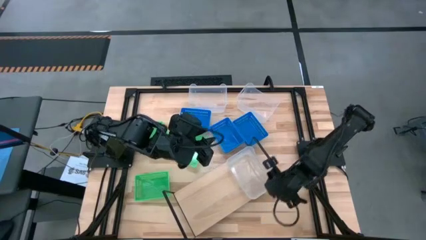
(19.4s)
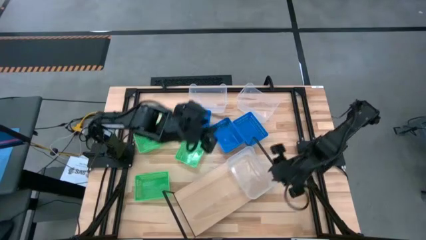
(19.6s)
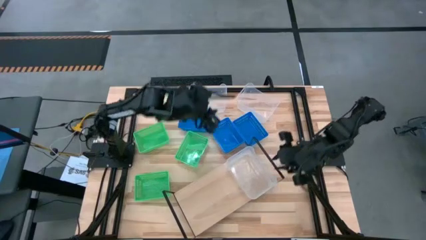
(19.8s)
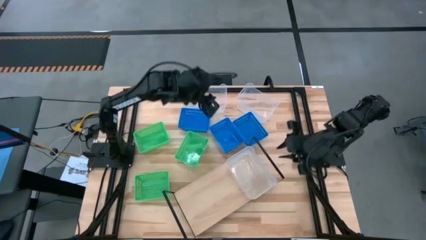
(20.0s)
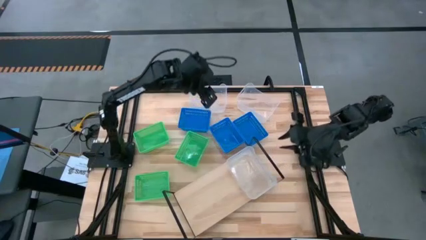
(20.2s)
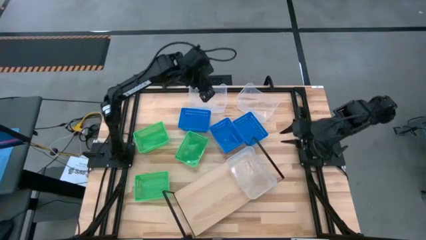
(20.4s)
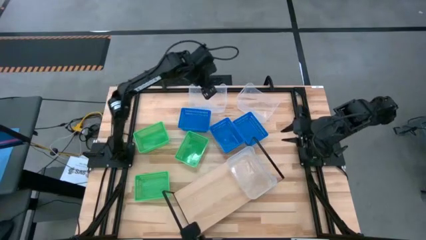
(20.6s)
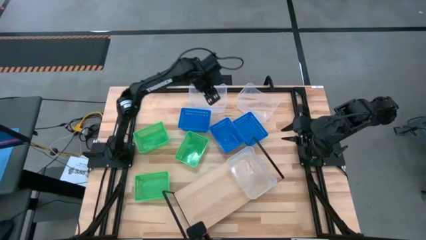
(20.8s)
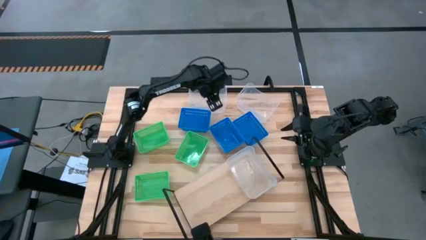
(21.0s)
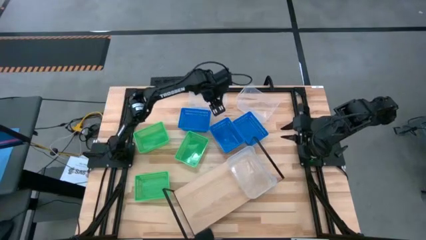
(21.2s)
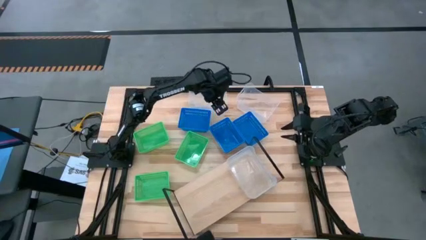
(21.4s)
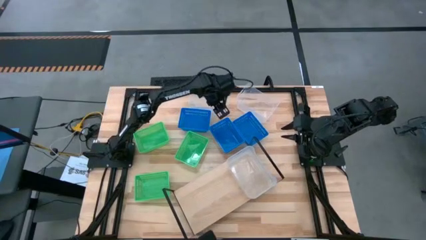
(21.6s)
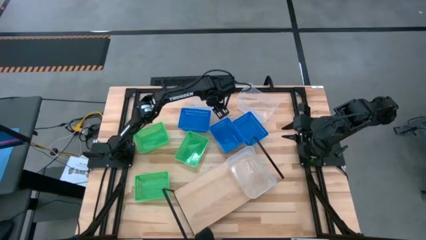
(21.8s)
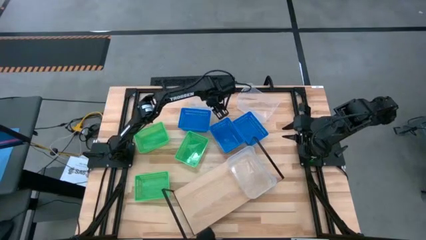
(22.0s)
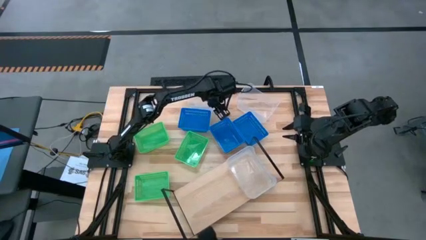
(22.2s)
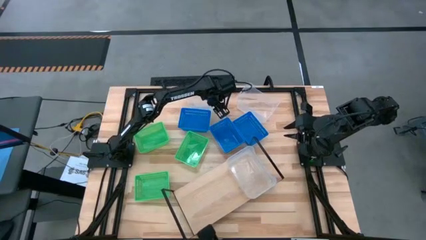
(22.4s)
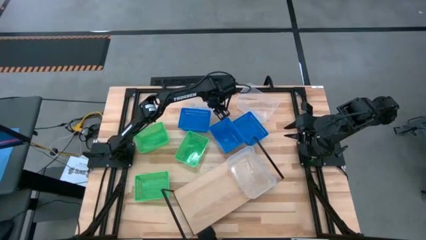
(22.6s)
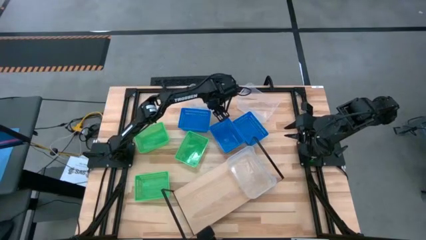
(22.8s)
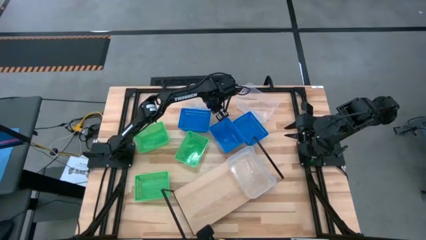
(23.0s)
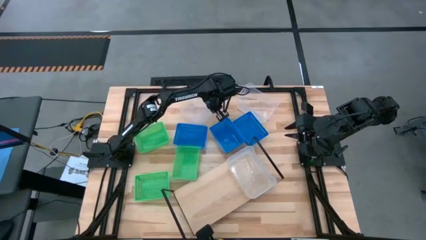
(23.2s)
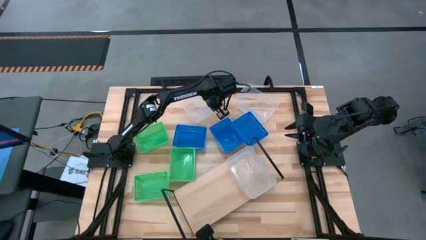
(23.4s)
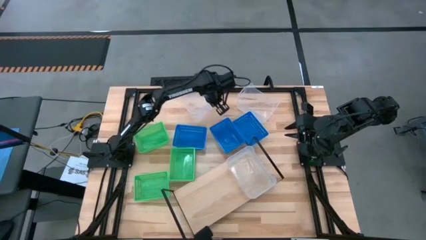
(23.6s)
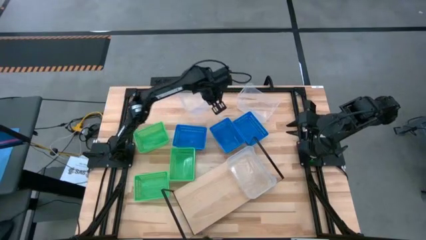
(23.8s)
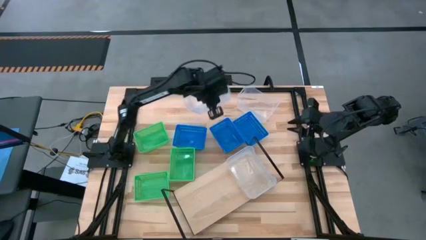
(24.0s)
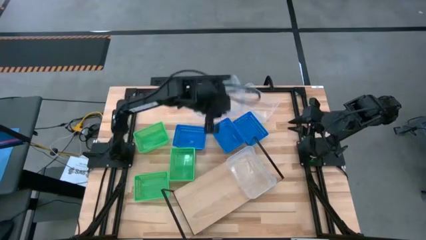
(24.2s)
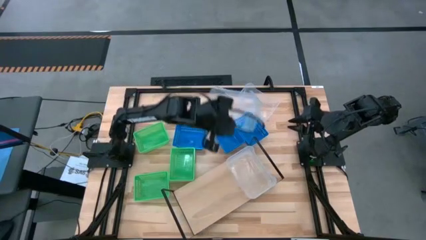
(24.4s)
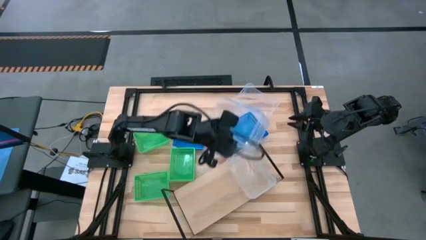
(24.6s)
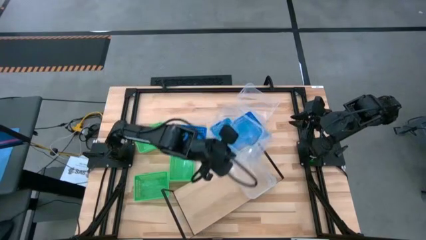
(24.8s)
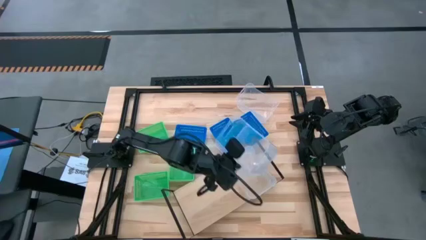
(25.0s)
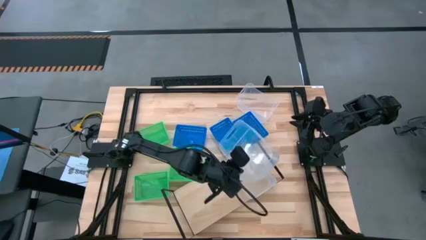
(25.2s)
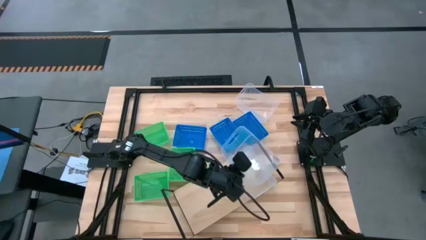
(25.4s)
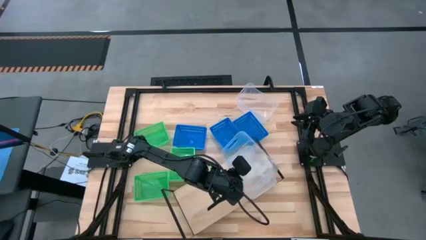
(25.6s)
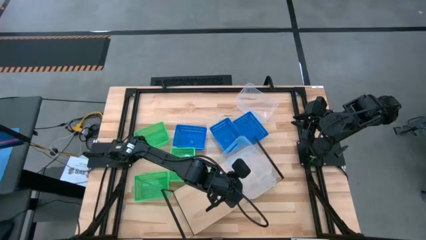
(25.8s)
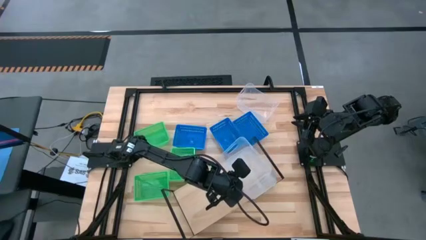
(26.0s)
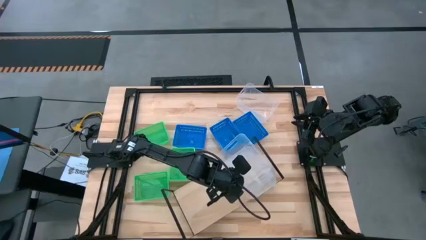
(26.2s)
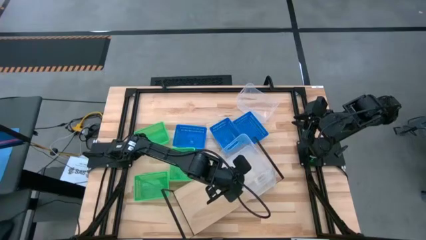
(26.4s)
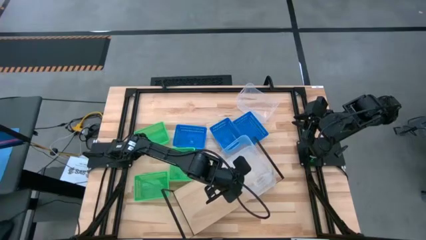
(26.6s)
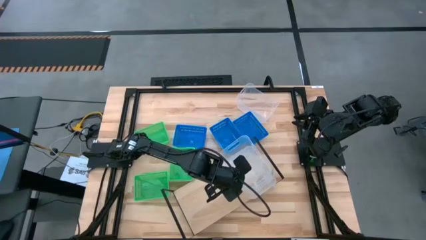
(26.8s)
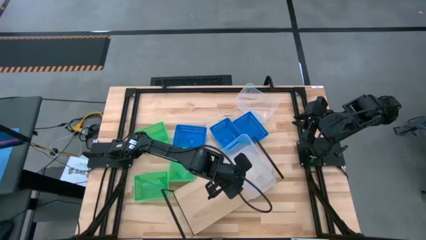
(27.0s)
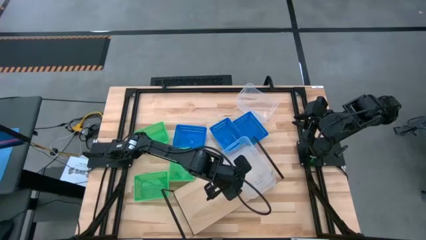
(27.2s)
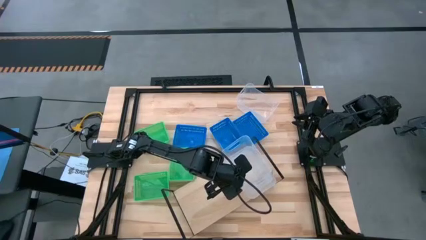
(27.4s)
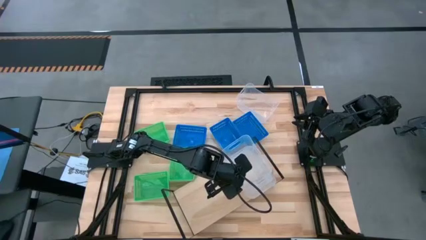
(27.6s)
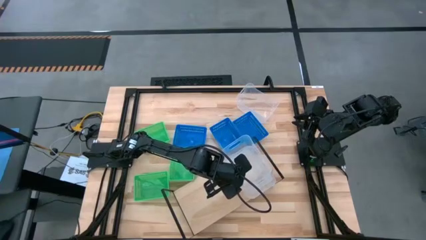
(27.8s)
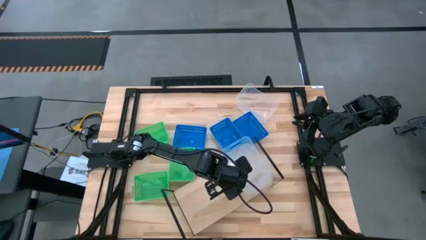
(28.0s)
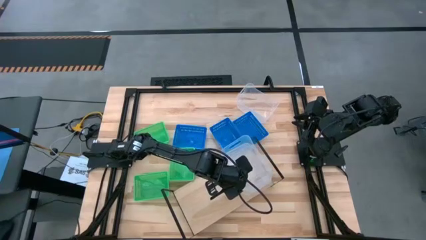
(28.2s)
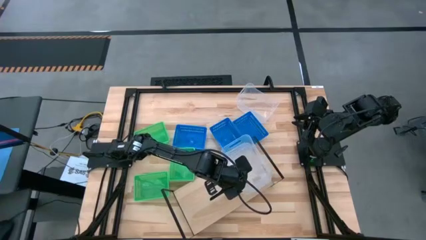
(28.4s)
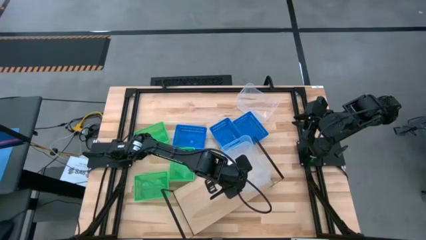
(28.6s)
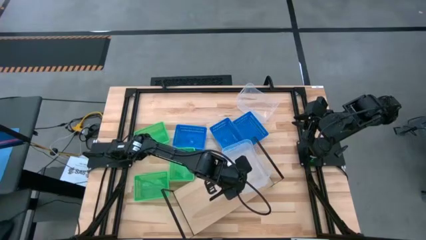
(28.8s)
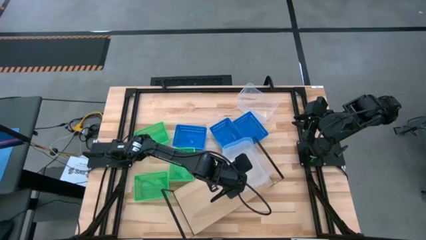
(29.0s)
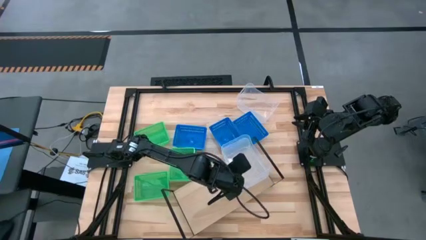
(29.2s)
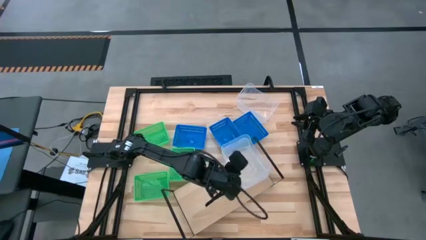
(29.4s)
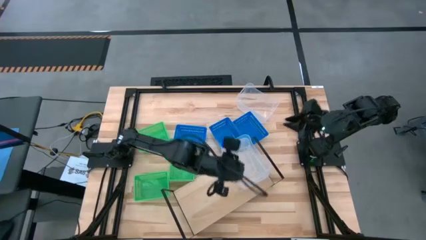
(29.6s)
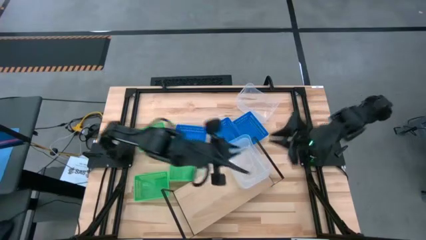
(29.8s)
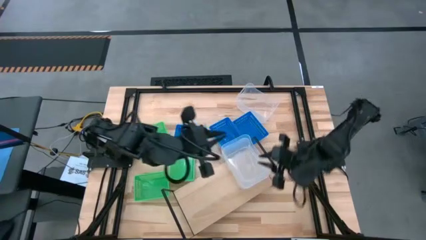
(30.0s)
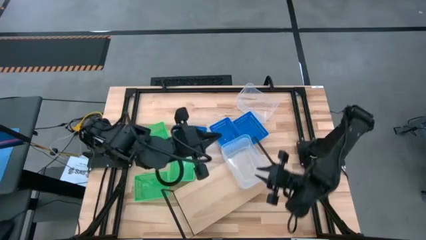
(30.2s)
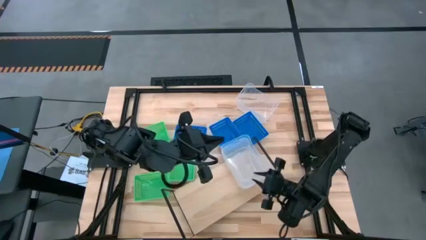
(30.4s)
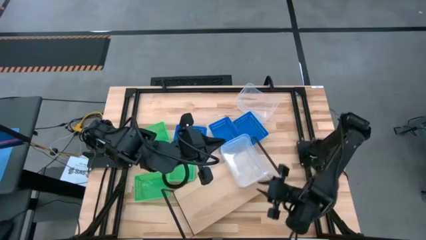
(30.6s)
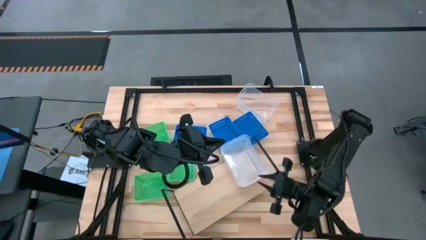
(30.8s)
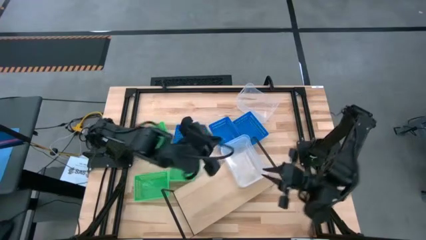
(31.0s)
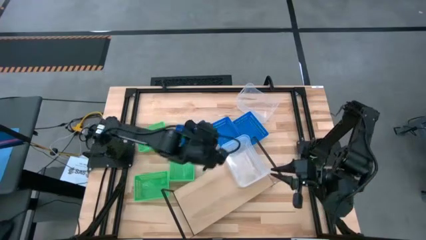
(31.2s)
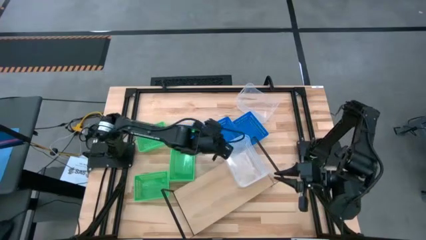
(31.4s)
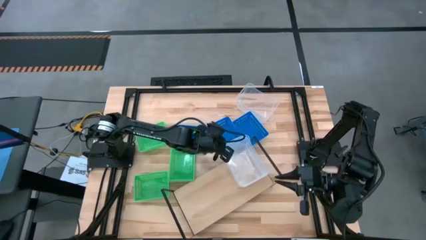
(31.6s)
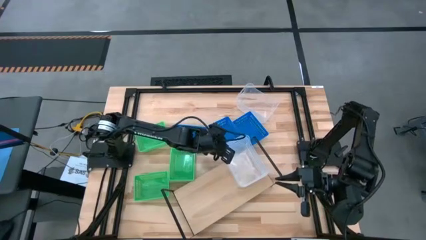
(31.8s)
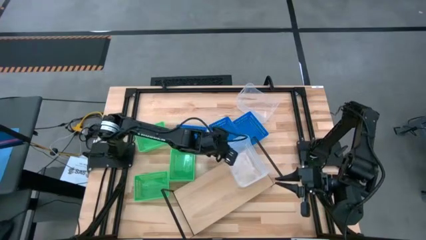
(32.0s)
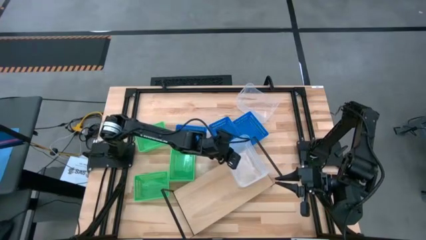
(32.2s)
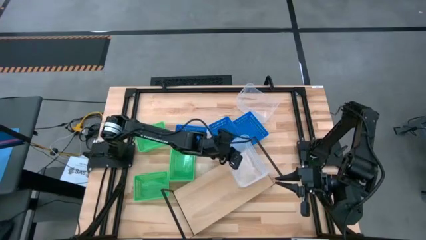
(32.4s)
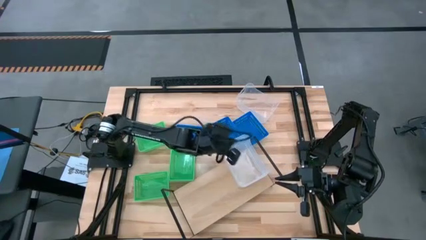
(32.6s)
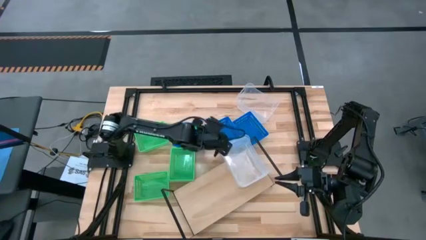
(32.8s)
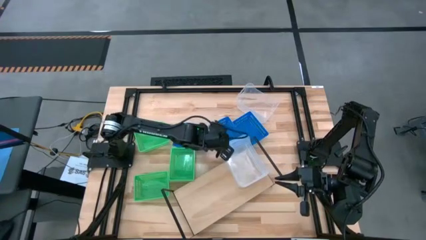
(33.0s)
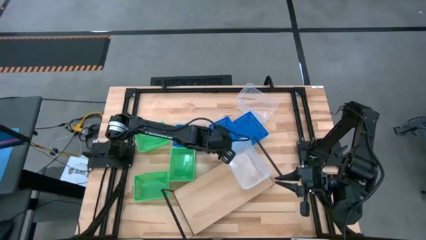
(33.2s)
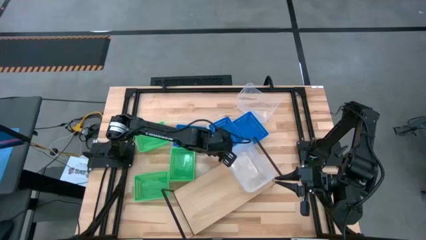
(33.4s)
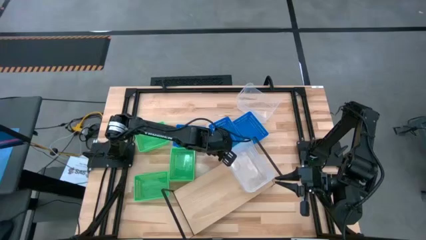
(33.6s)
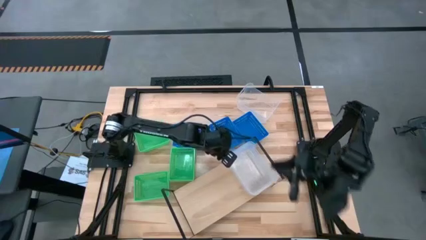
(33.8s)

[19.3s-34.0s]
Task: Stack baskets on shelf by color
Stack the left transparent bin on top of the other transparent bin on the shelf

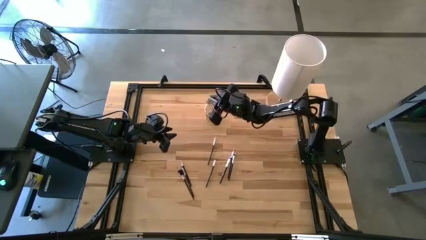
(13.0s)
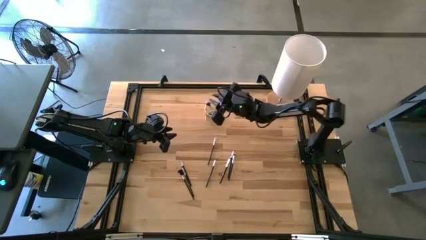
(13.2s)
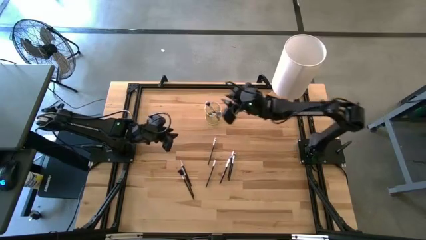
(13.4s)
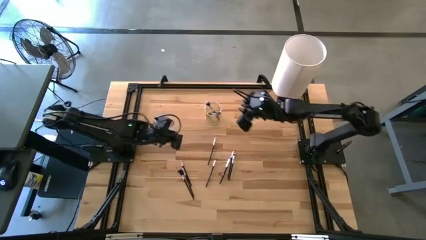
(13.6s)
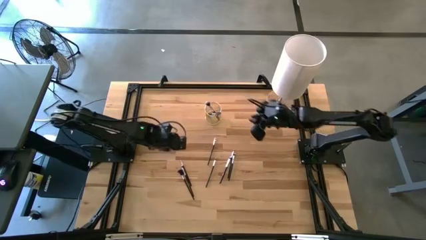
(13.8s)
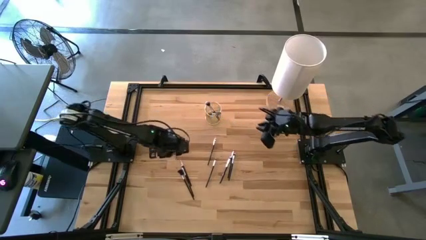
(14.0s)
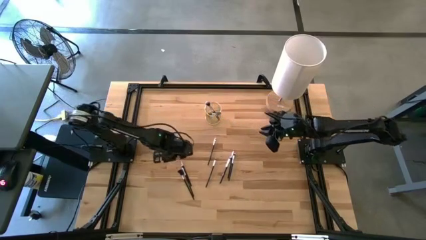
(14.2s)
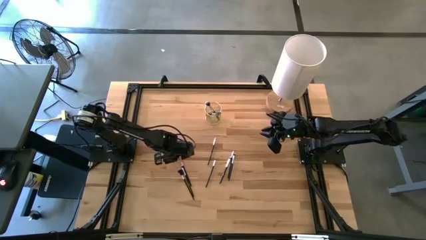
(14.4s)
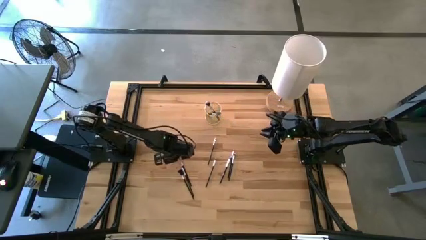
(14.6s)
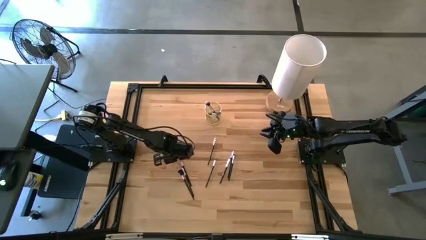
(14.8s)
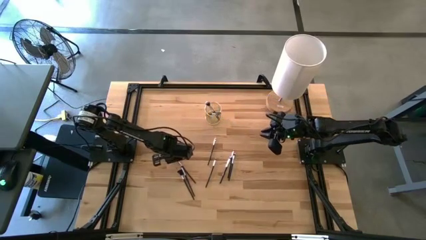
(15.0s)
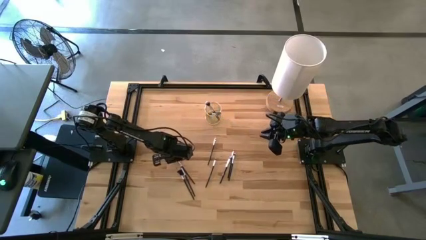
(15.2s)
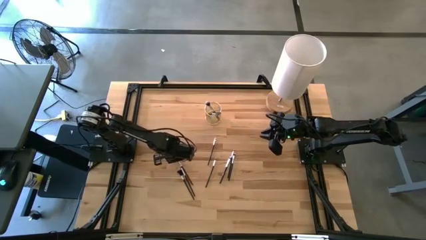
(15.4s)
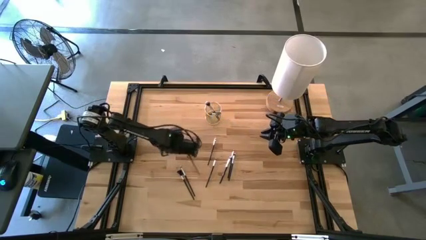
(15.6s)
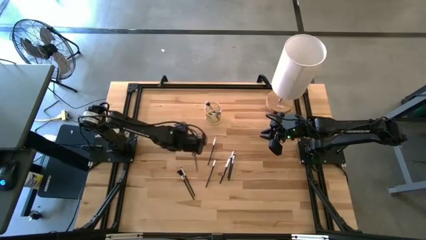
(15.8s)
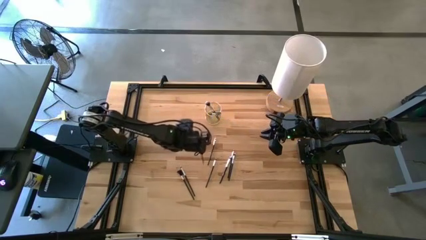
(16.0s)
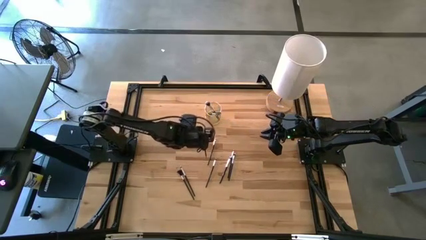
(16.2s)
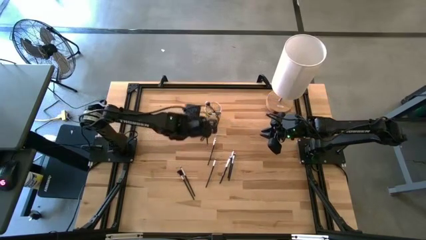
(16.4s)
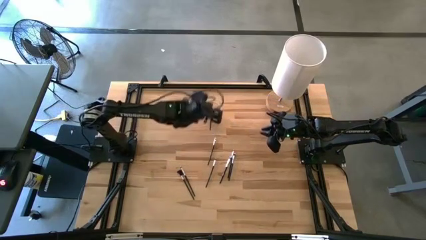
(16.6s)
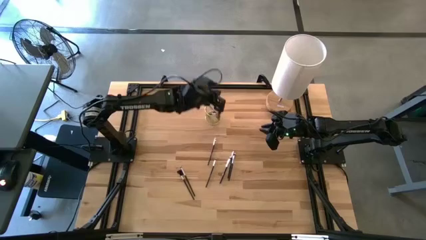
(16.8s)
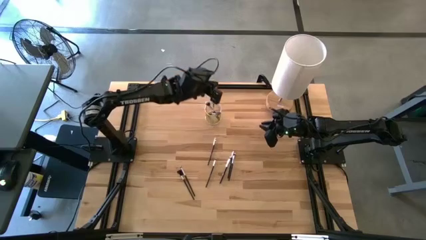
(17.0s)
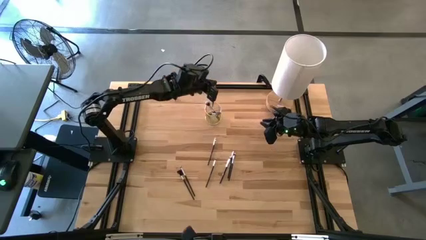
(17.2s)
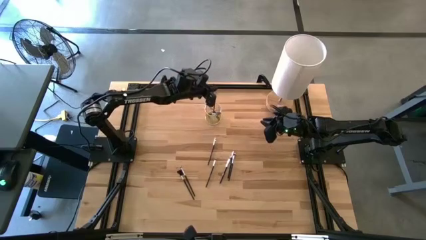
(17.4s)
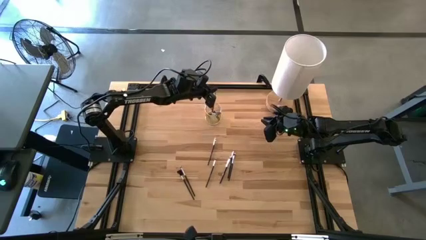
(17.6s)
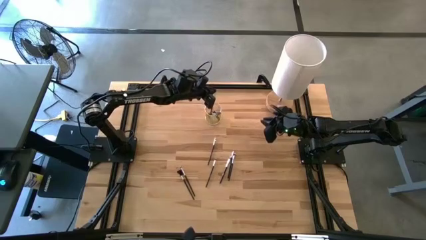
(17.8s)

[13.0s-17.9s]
Task: Put items in baskets/containers
Put the eyeshadow brush into the pen holder
